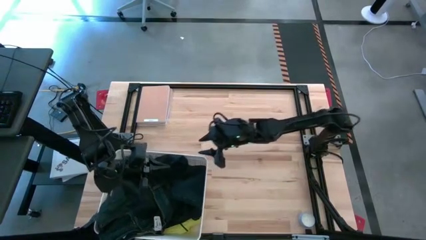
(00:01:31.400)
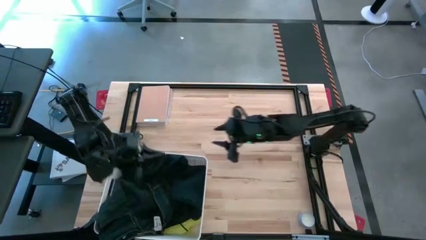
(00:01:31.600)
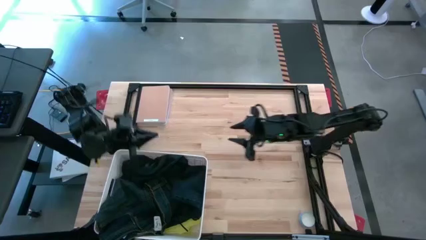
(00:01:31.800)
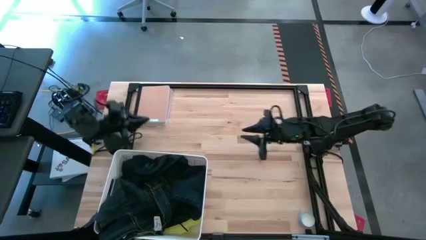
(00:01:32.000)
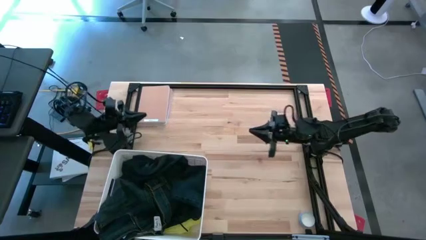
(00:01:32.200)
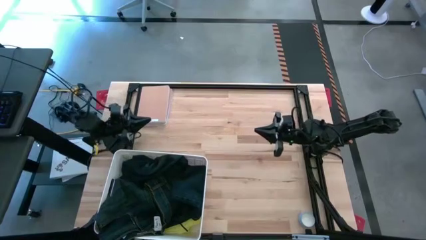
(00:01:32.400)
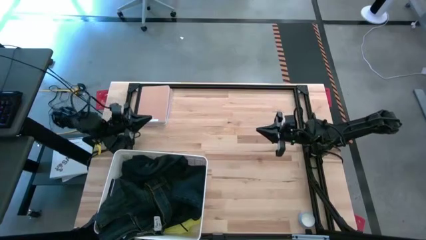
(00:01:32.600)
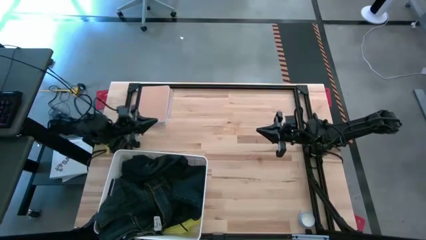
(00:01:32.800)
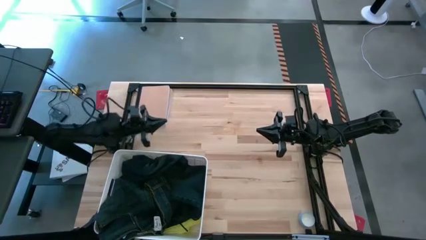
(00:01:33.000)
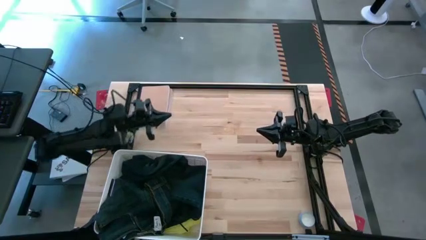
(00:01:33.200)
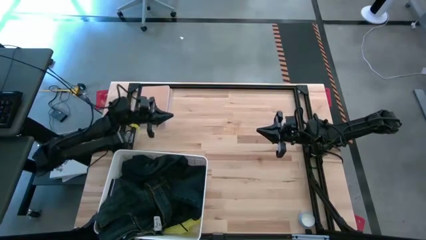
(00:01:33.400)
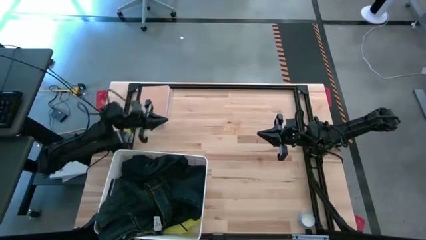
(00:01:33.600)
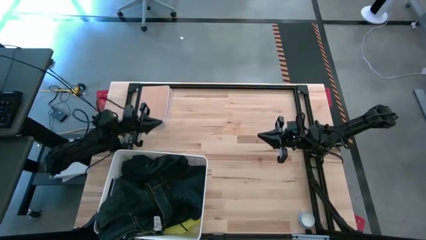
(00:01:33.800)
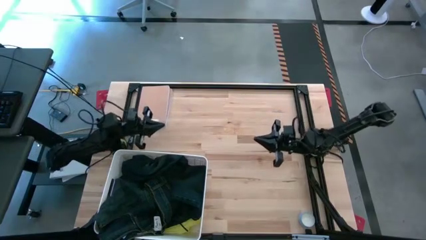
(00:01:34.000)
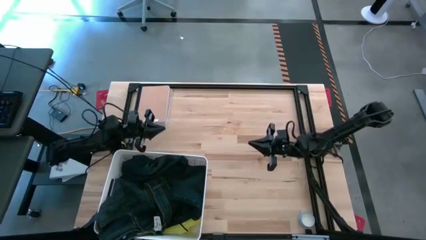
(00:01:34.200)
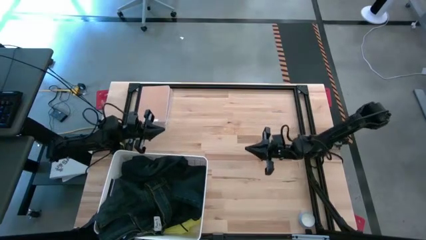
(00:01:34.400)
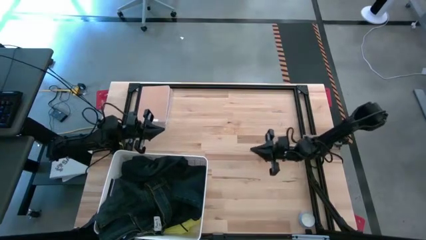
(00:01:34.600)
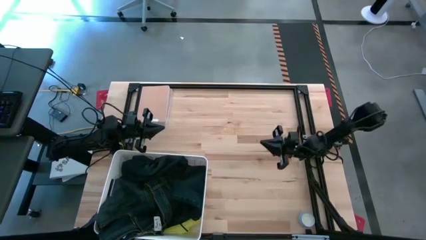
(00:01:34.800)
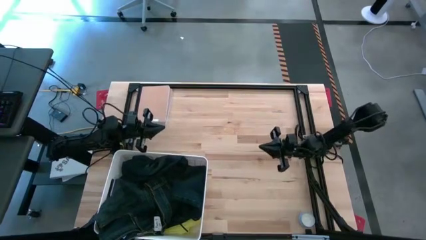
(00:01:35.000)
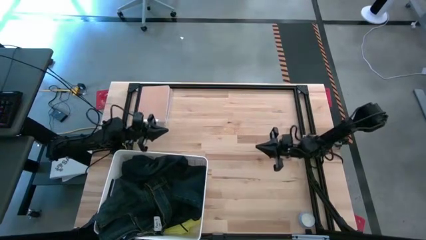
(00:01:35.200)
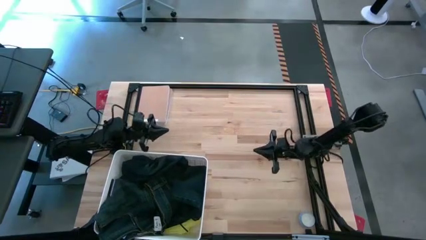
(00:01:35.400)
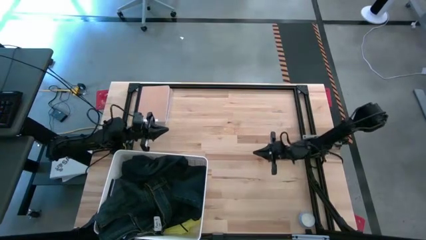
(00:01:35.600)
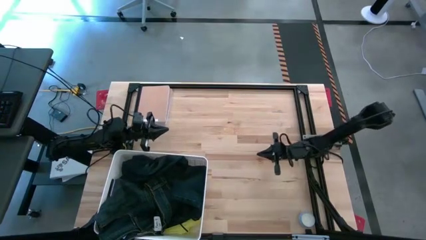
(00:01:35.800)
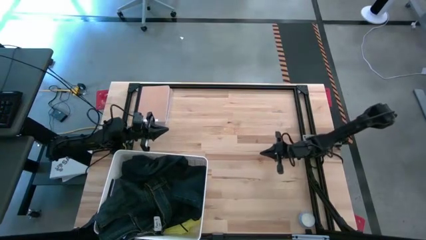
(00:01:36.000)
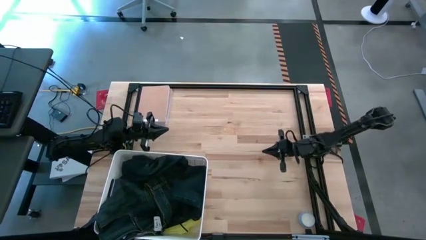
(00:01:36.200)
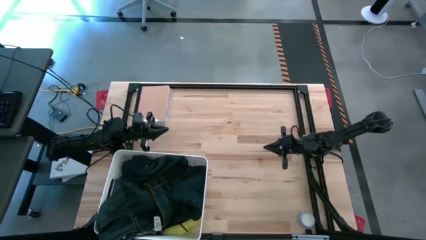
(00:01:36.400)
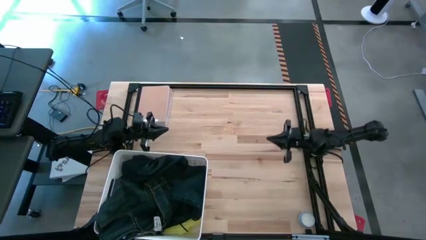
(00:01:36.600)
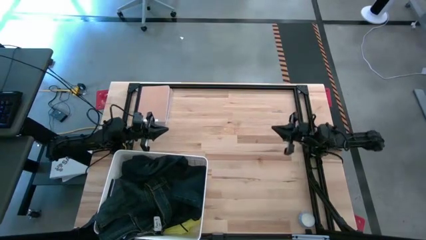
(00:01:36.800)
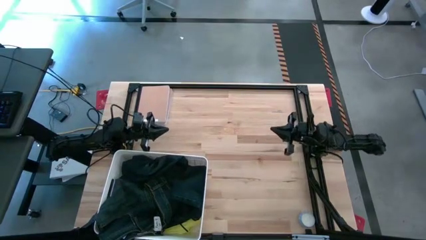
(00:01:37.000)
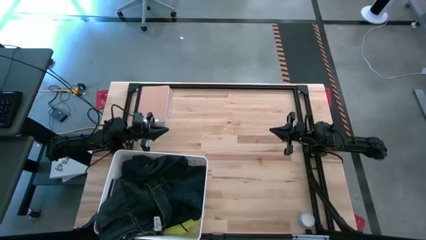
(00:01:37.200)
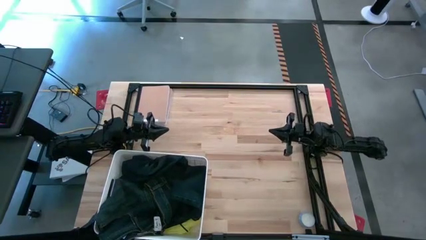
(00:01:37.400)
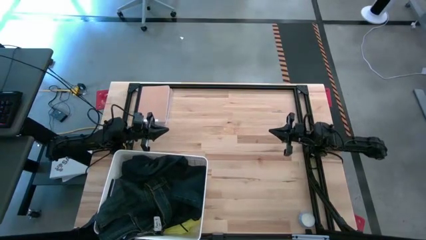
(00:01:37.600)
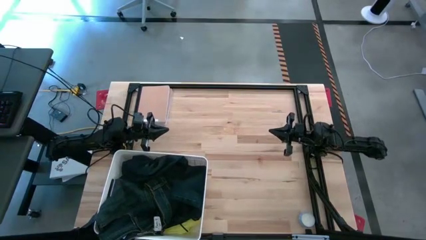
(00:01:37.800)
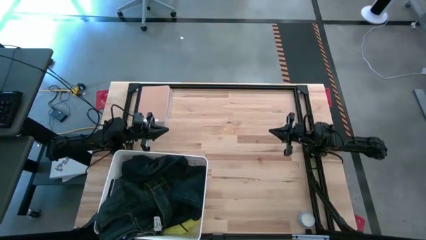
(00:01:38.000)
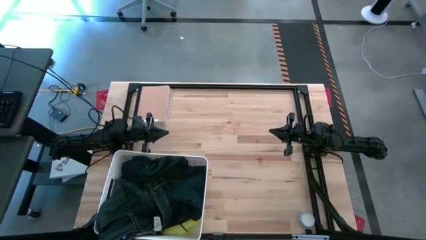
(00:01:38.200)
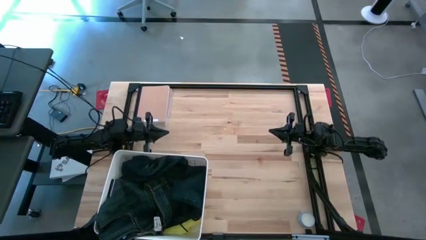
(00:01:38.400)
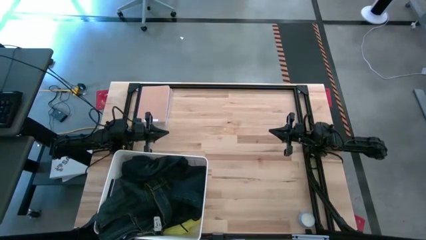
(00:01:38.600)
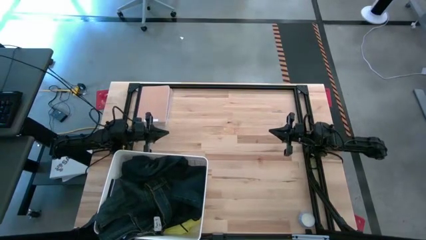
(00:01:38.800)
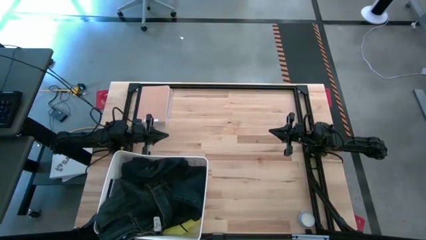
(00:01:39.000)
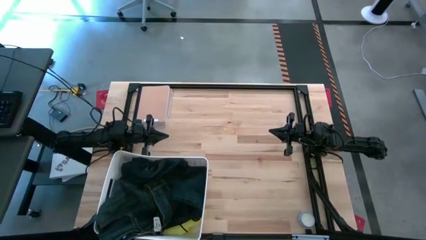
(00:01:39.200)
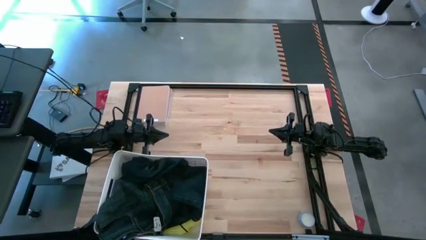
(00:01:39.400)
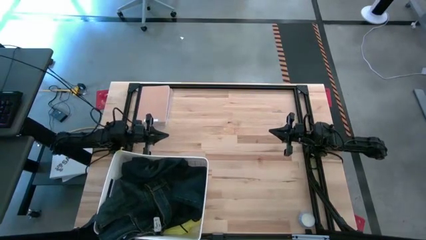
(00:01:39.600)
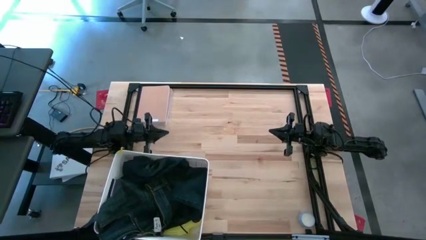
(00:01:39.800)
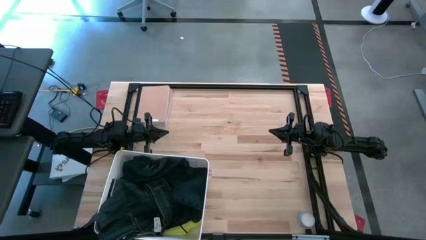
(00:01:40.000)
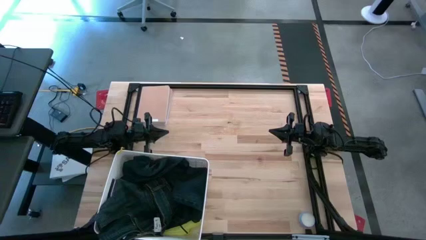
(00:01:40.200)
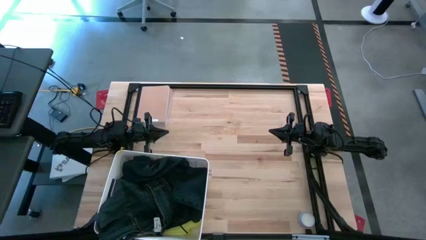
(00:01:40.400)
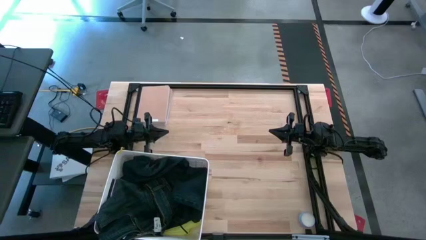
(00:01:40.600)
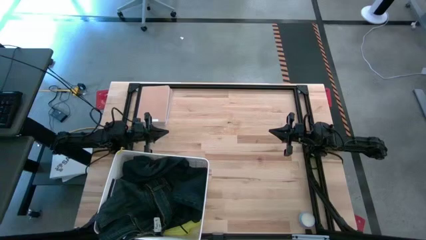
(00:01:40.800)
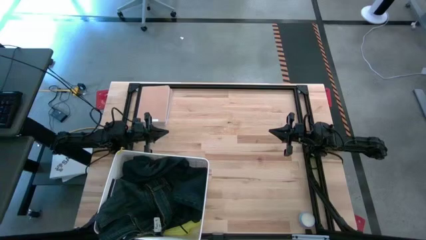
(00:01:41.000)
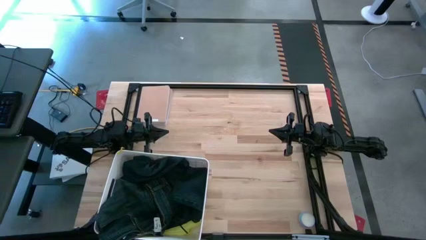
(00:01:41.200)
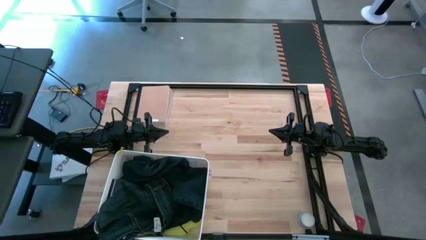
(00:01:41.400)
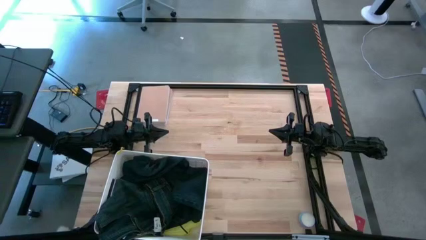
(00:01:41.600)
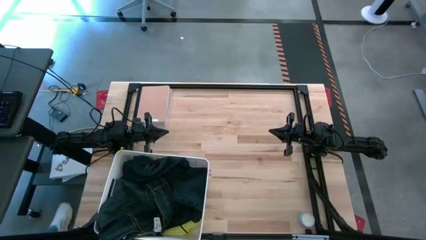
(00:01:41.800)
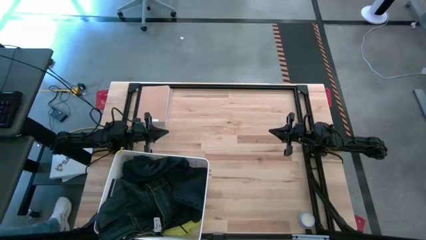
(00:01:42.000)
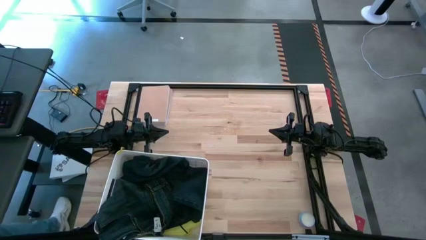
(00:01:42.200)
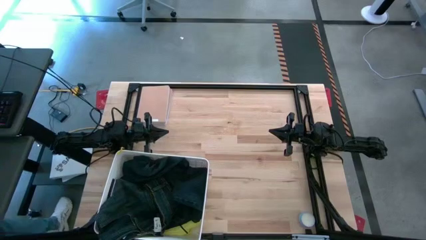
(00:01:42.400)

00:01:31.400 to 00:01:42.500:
Task: Sort clothes
Return to Home Position
